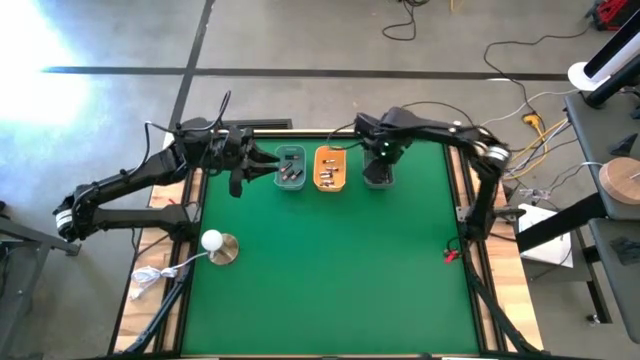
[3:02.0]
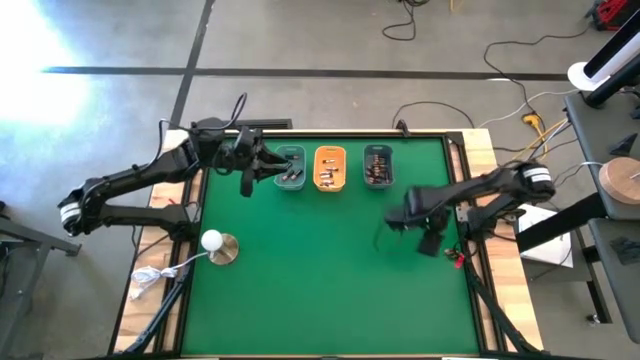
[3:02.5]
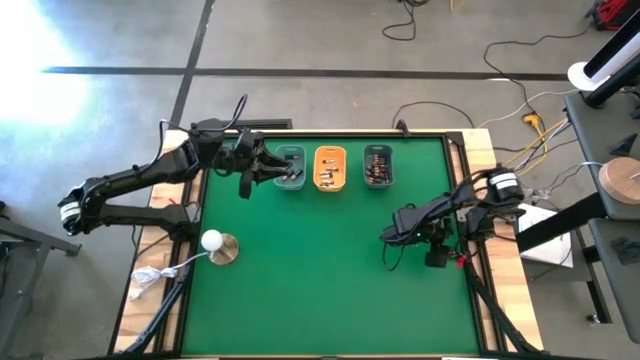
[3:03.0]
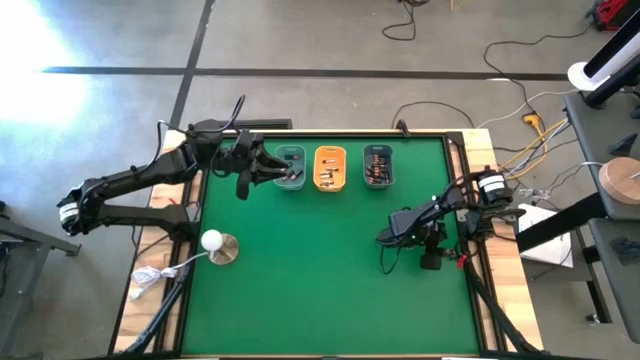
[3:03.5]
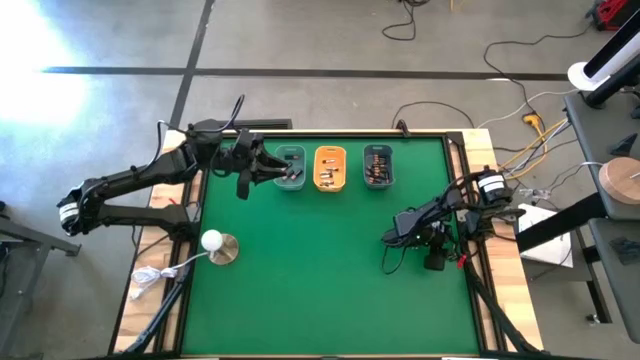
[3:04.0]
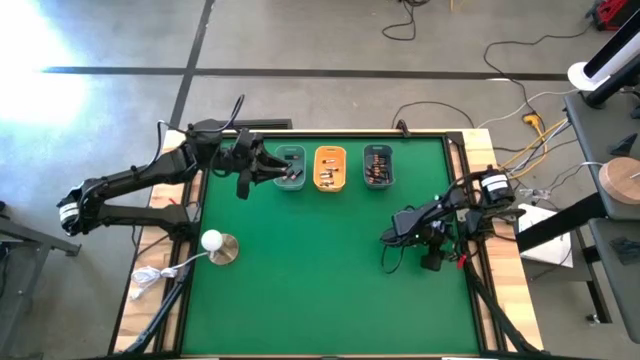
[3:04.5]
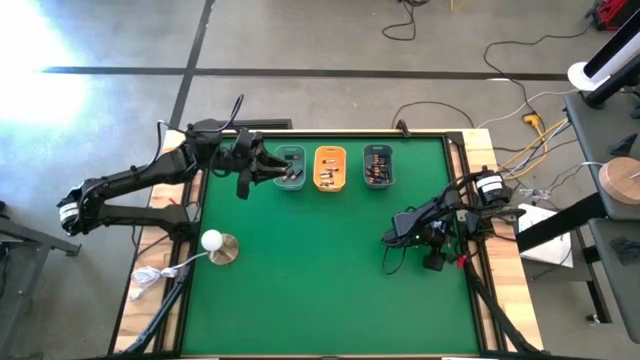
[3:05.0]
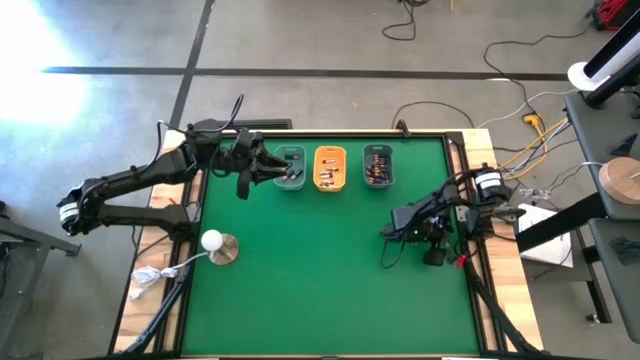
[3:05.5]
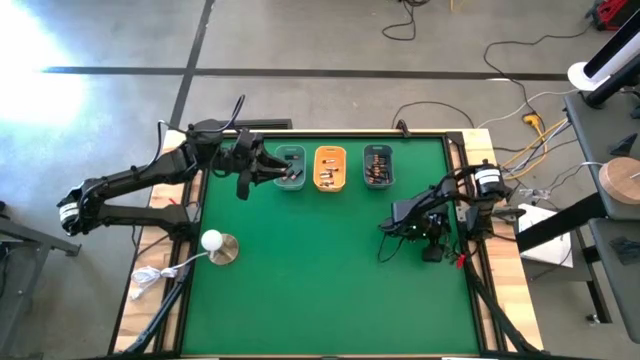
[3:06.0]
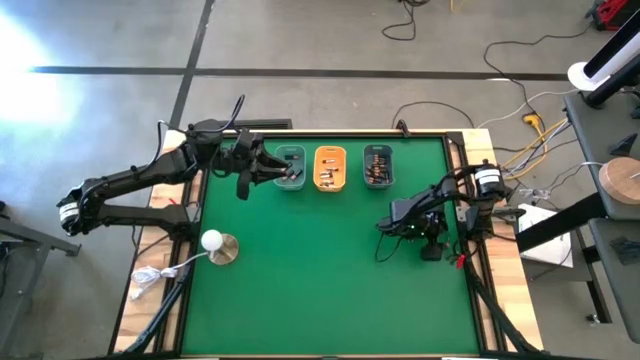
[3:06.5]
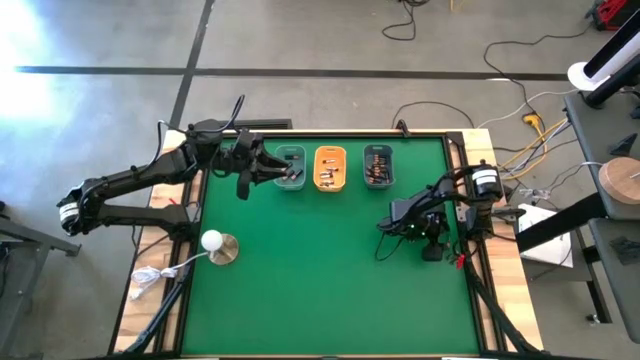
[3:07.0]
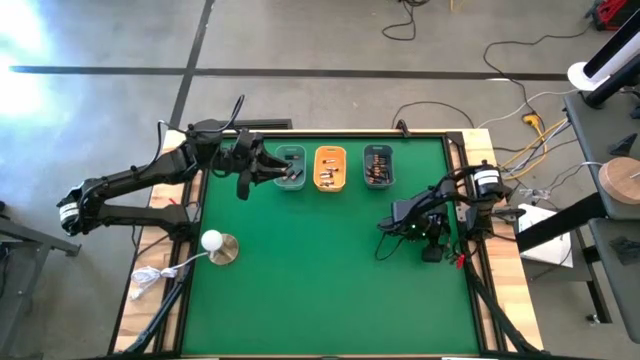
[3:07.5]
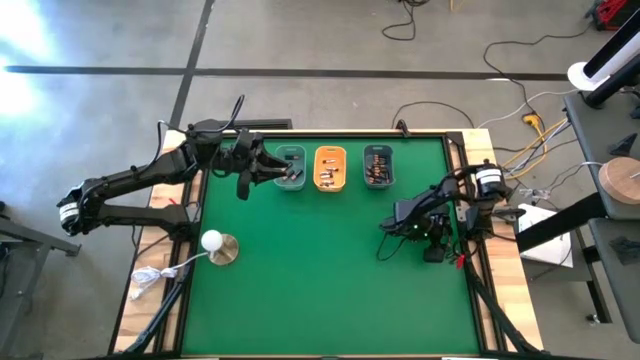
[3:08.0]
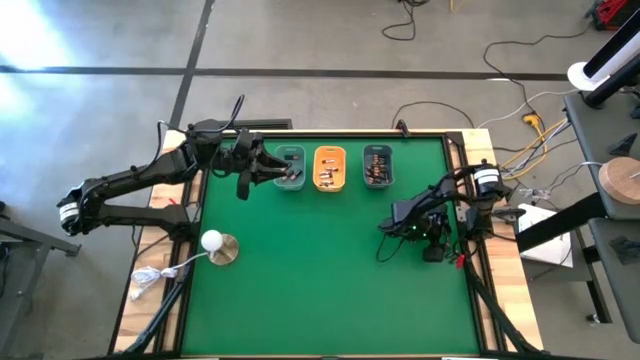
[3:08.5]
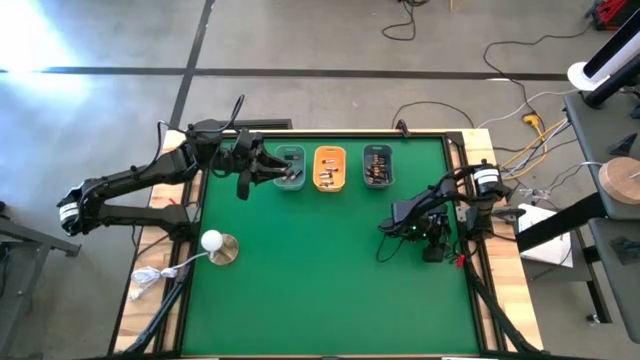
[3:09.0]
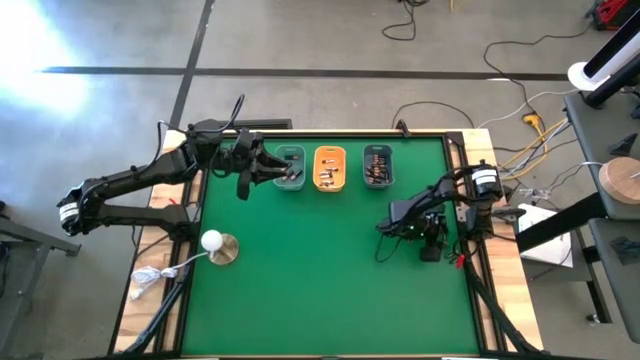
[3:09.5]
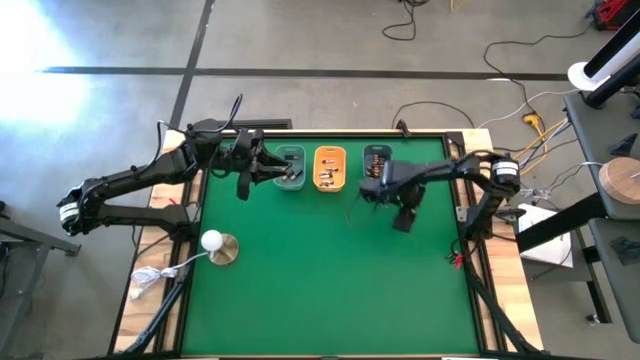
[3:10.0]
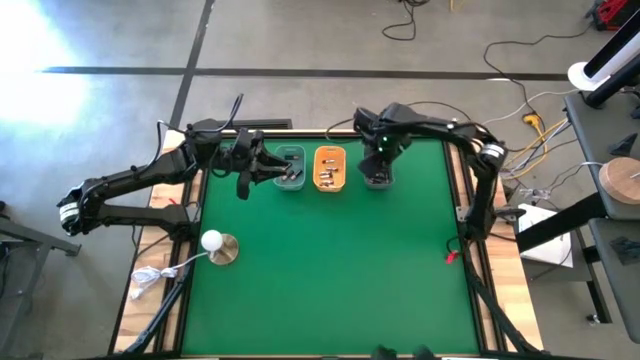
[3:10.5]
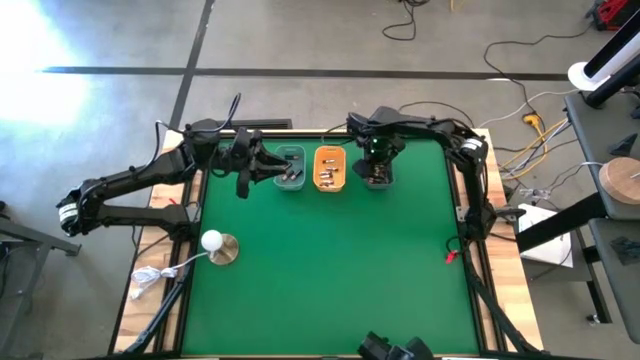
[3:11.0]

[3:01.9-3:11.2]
Task: Sort batteries
Put the small brown battery into the gray bin

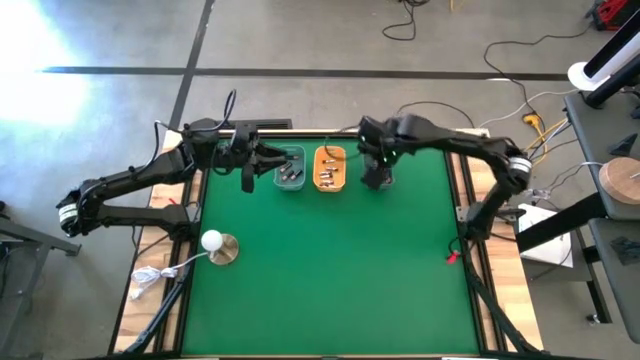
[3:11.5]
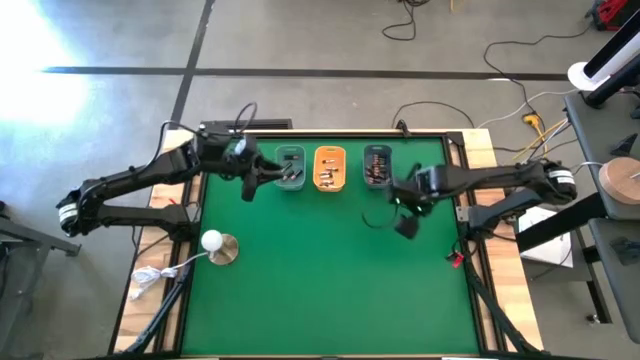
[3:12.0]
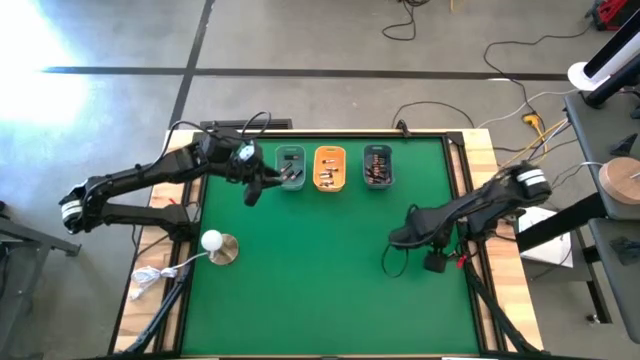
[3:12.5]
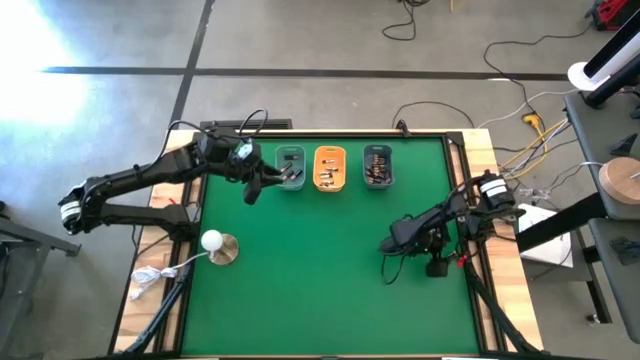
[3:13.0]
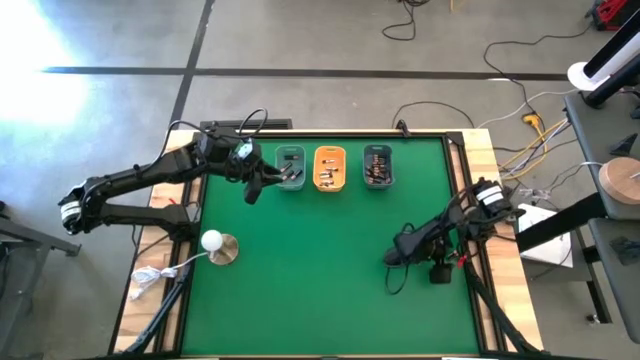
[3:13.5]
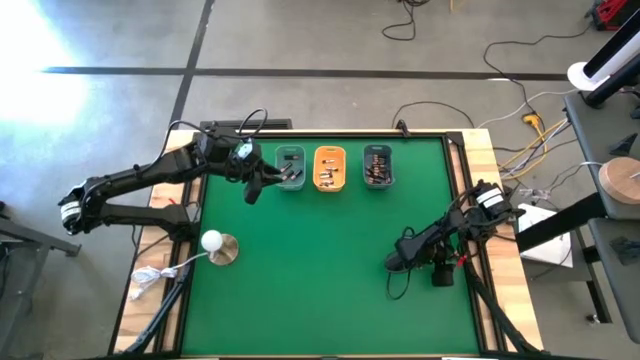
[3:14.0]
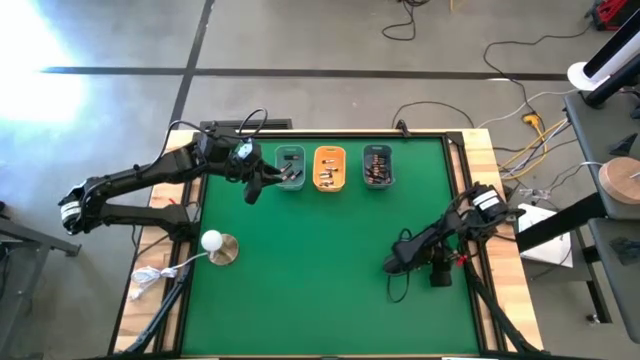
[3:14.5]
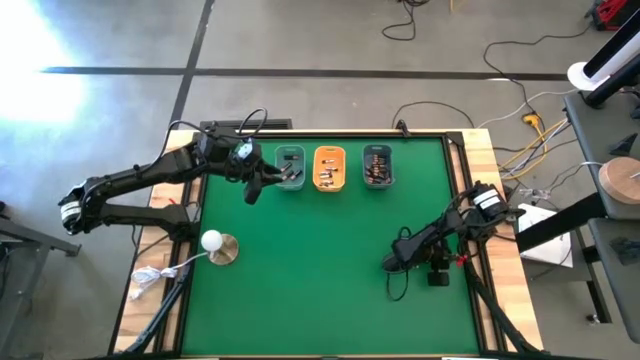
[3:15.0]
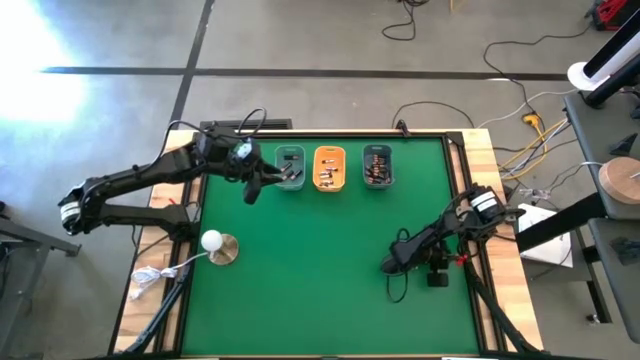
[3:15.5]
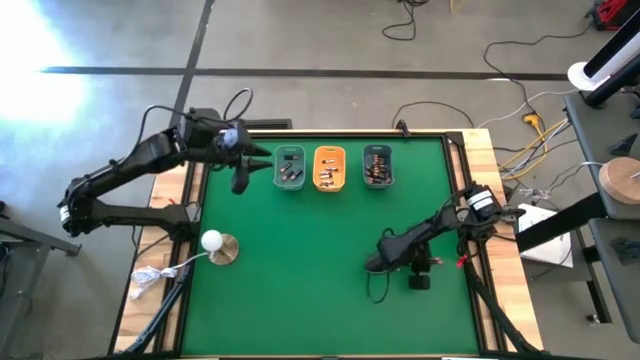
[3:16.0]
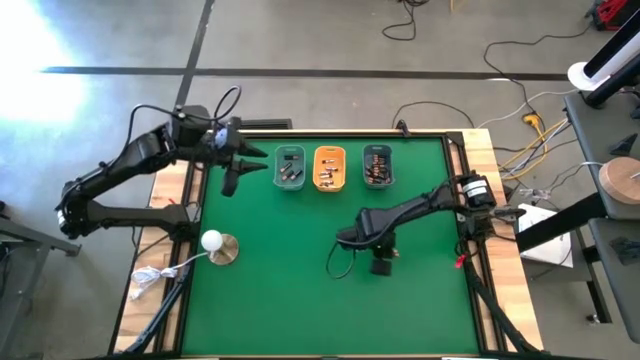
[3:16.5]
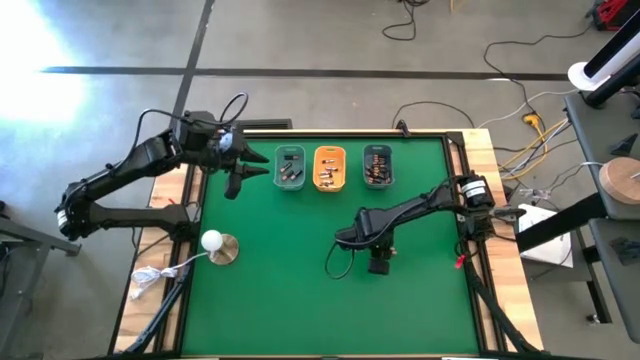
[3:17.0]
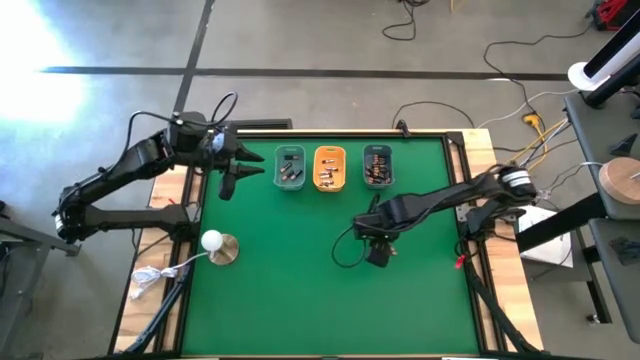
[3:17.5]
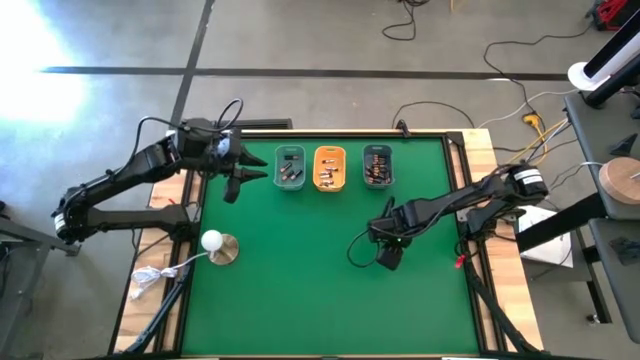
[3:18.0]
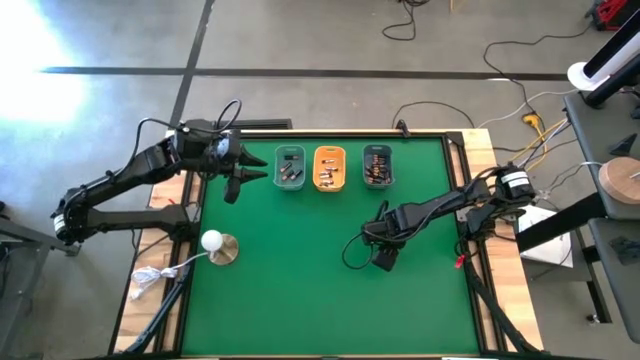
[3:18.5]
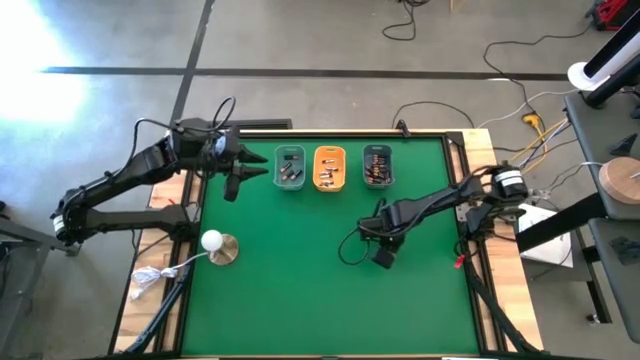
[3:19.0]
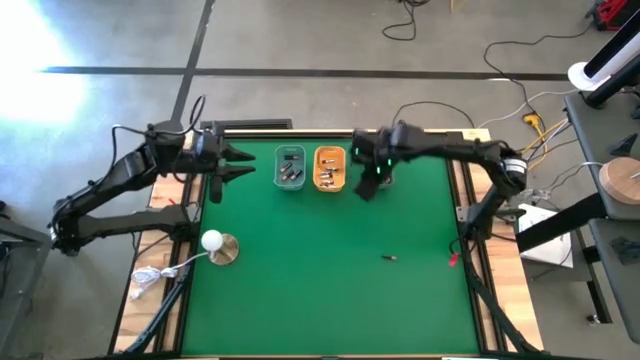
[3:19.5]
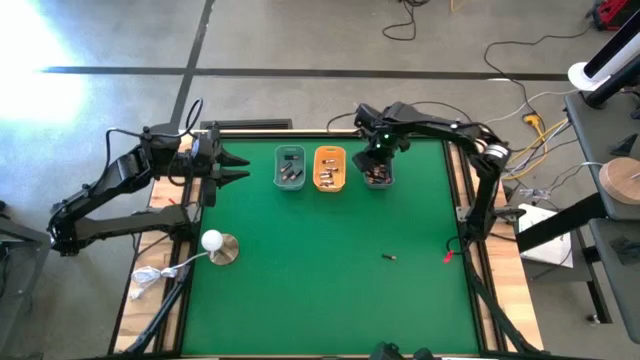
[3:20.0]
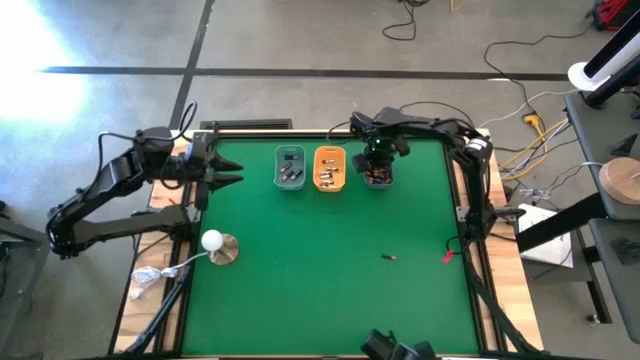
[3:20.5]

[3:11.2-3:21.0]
Put the small brown battery into the gray bin

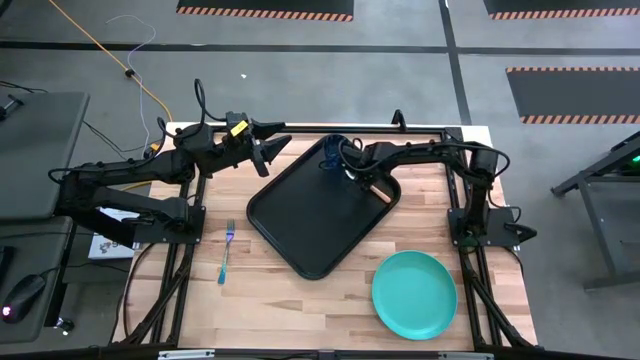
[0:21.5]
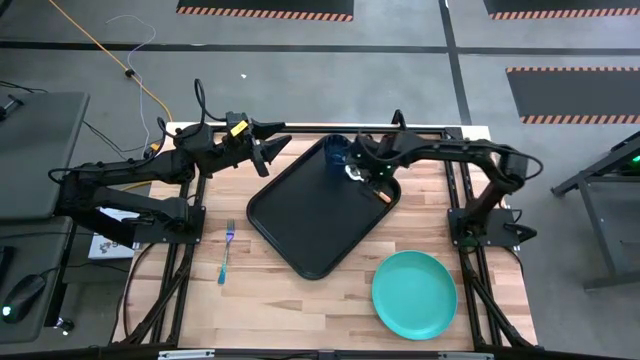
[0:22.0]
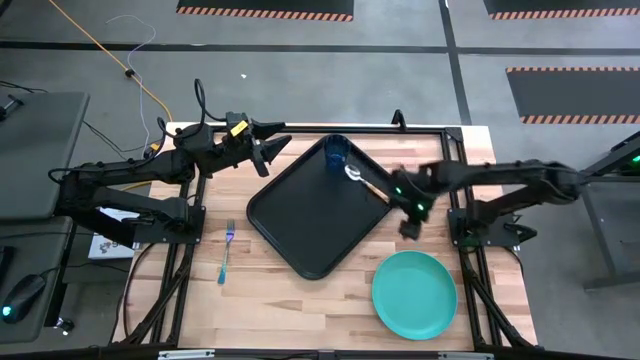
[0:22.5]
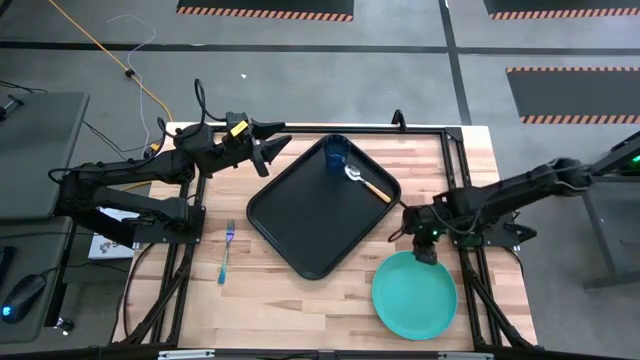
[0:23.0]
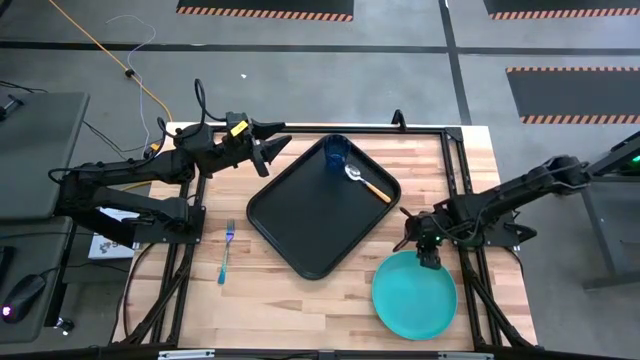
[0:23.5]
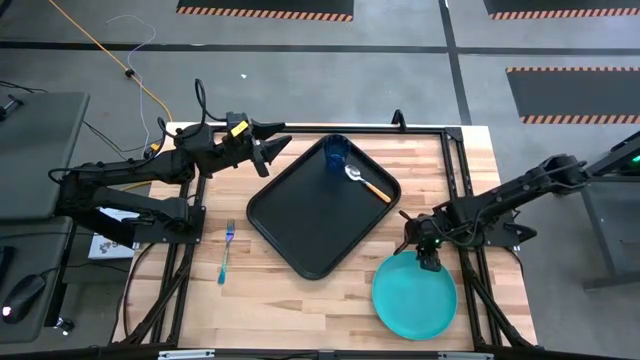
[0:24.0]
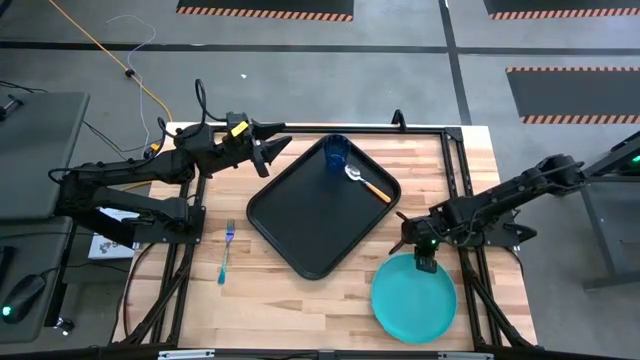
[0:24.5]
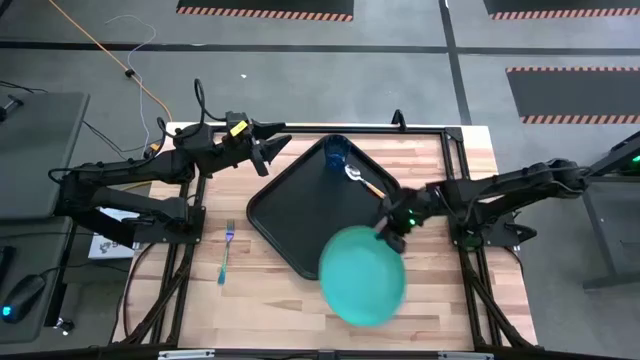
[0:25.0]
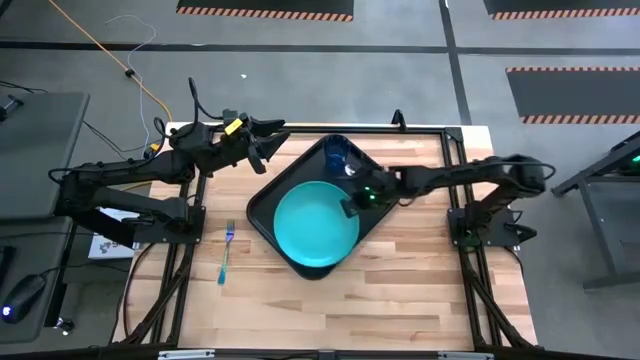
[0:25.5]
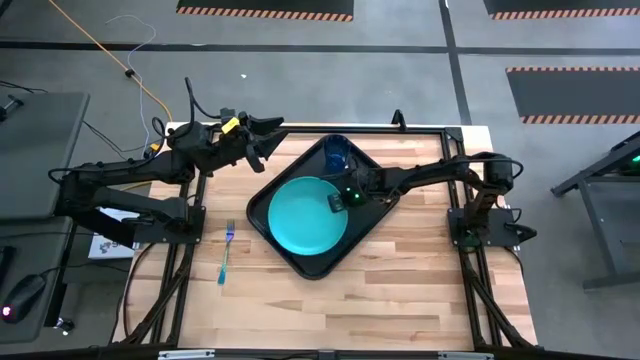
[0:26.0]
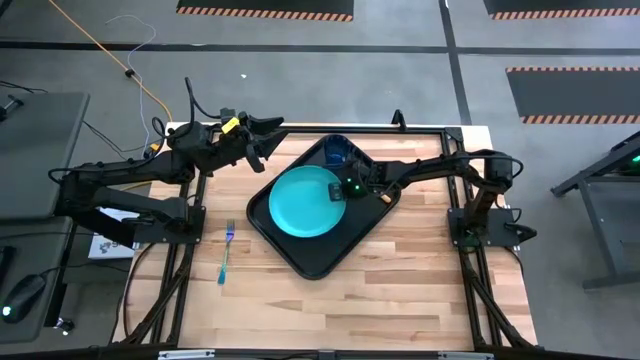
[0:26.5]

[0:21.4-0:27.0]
Task: Pick and place plate/cup/fork/spoon on tray
Put the green plate on the black tray to the left of the blue cup
